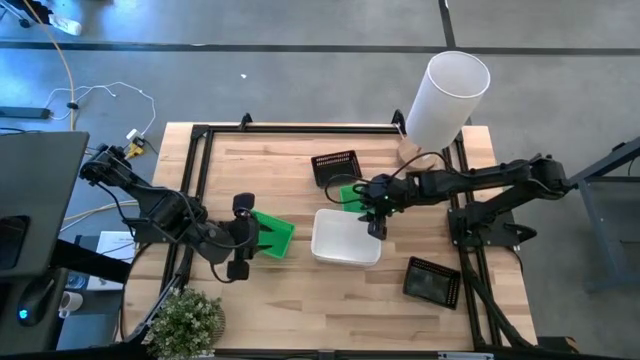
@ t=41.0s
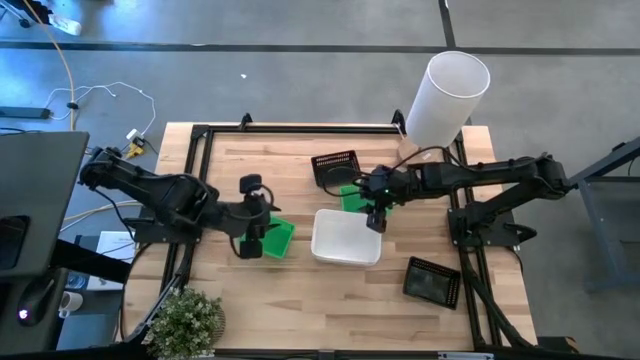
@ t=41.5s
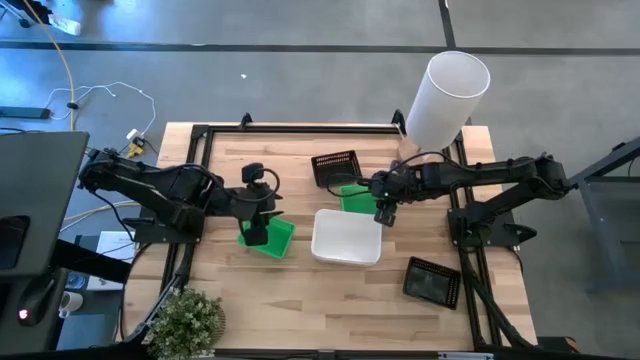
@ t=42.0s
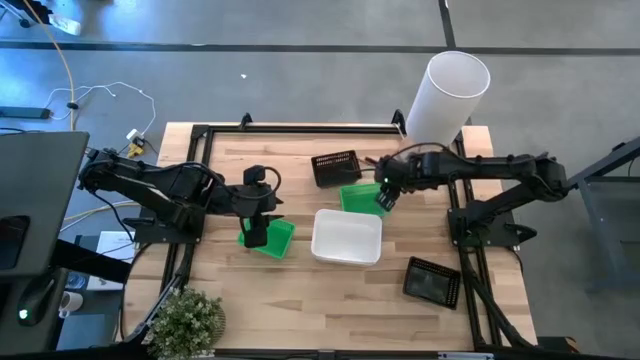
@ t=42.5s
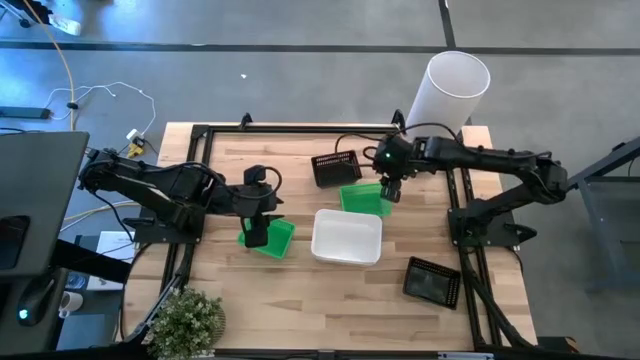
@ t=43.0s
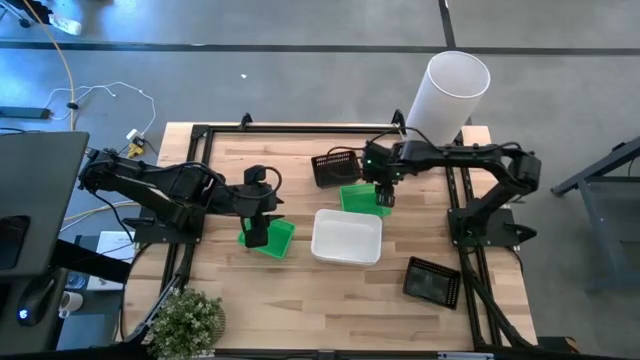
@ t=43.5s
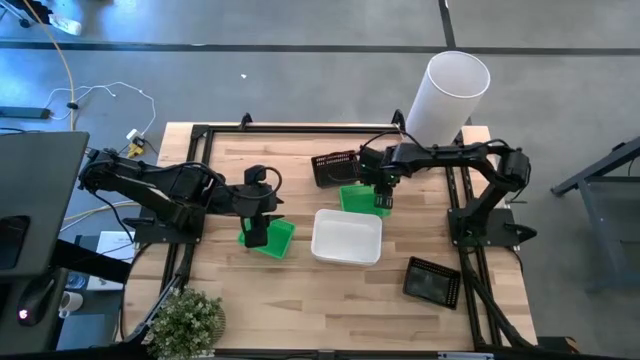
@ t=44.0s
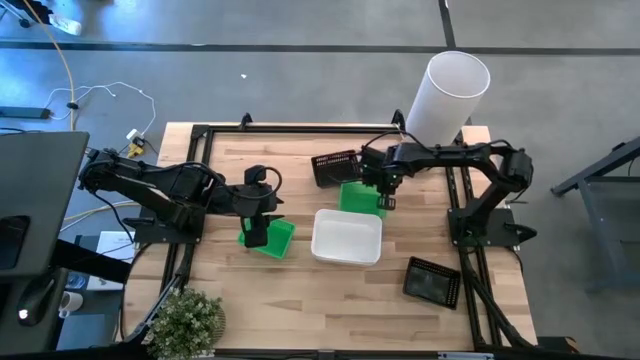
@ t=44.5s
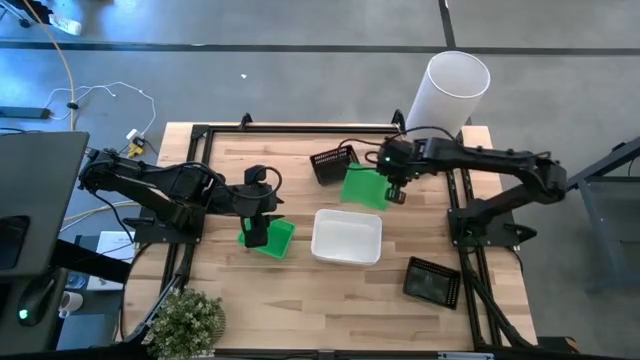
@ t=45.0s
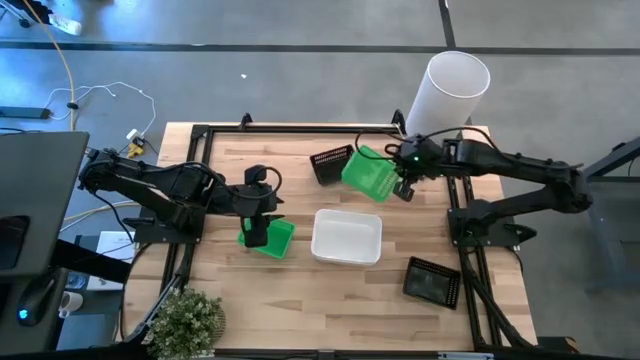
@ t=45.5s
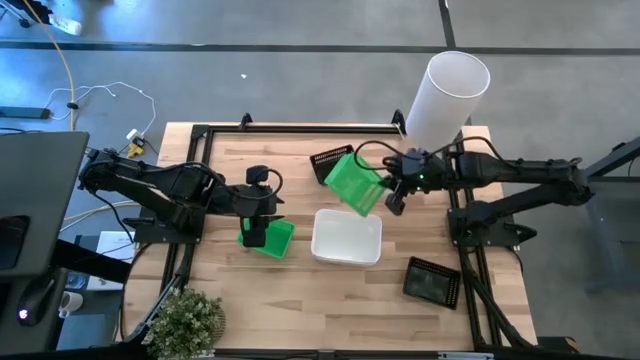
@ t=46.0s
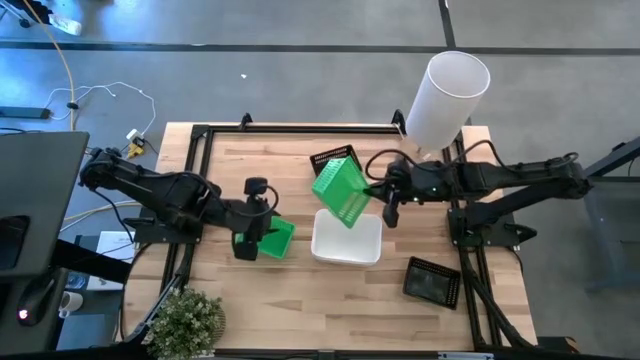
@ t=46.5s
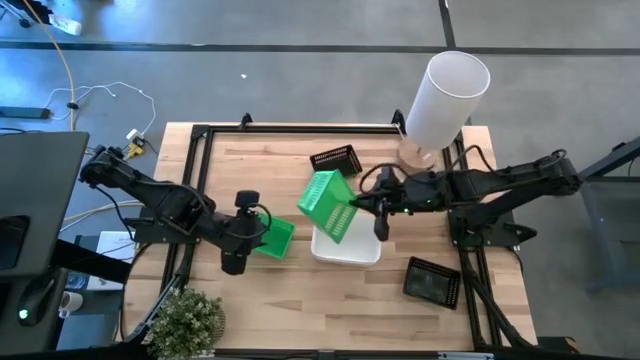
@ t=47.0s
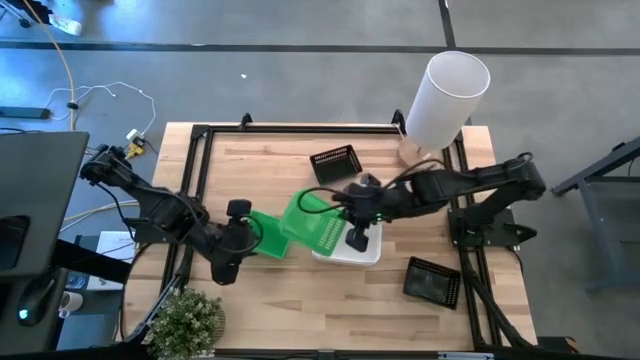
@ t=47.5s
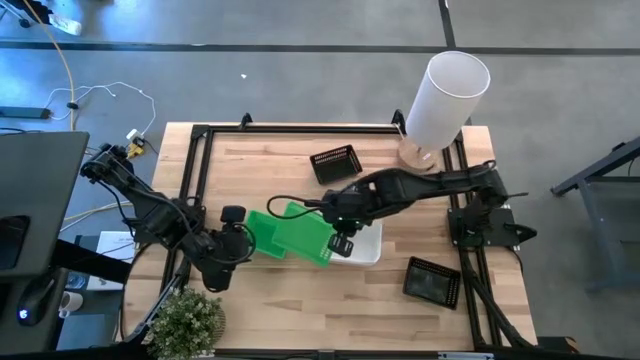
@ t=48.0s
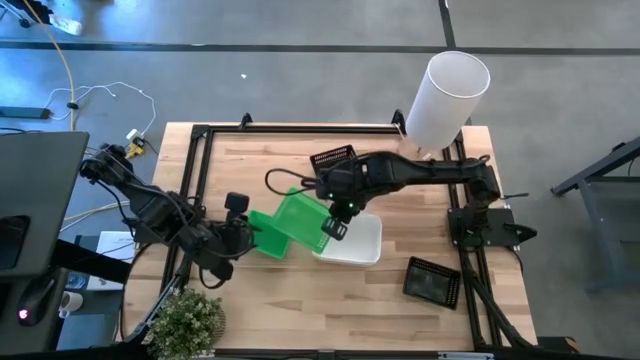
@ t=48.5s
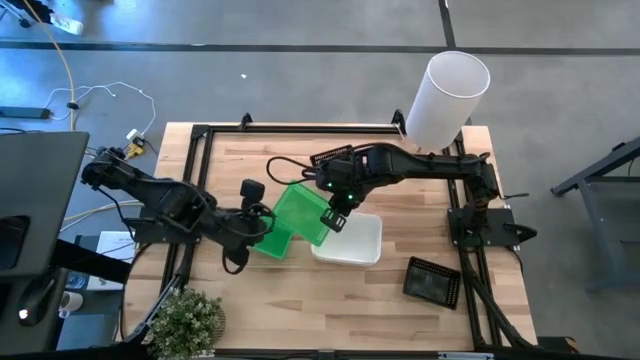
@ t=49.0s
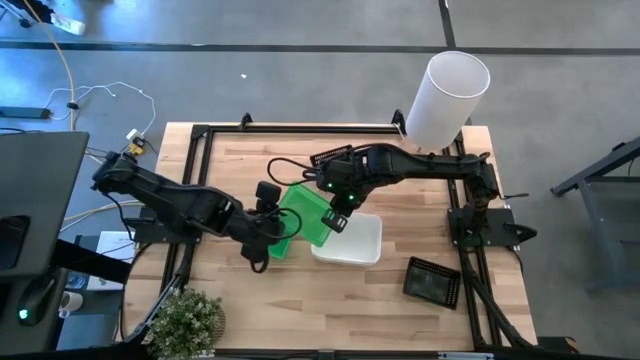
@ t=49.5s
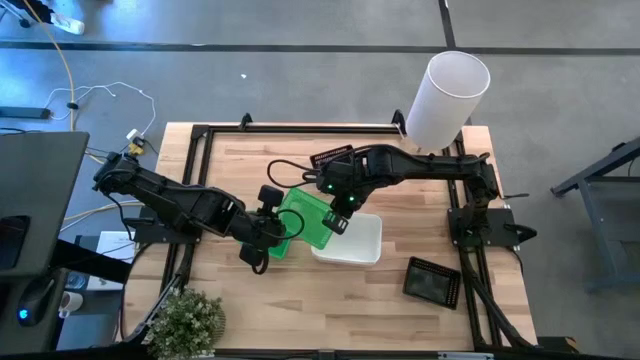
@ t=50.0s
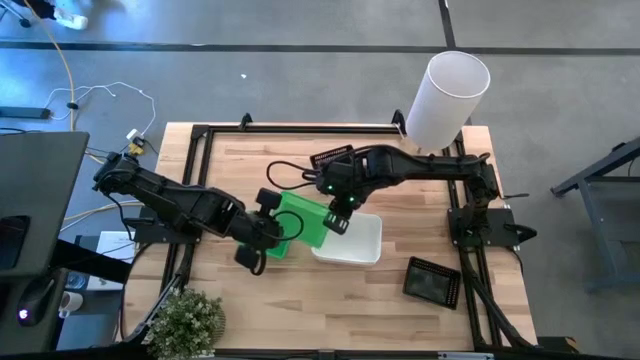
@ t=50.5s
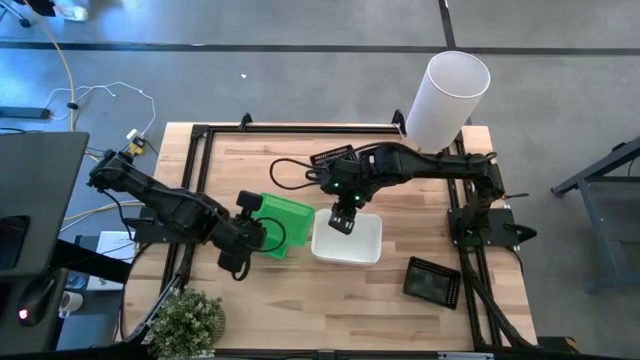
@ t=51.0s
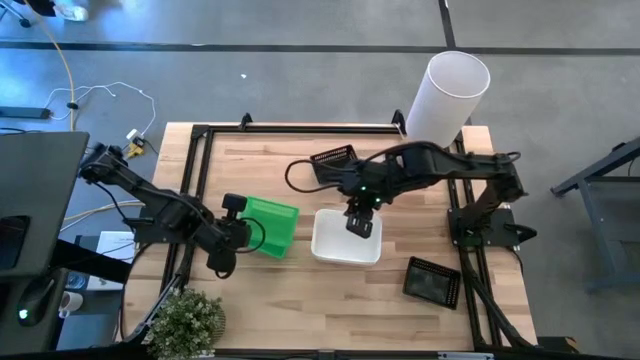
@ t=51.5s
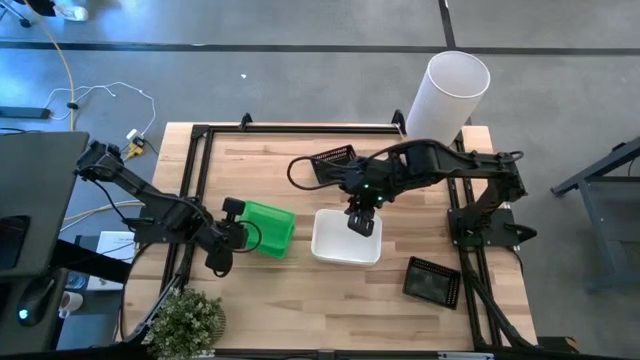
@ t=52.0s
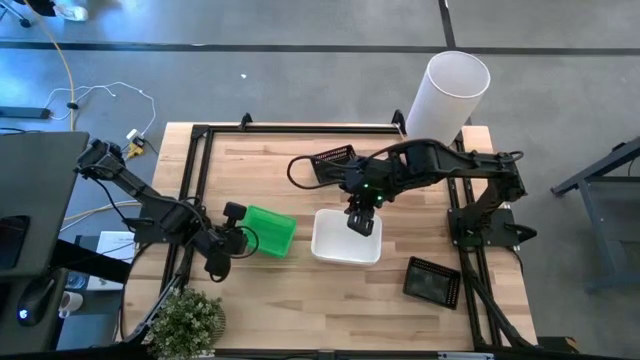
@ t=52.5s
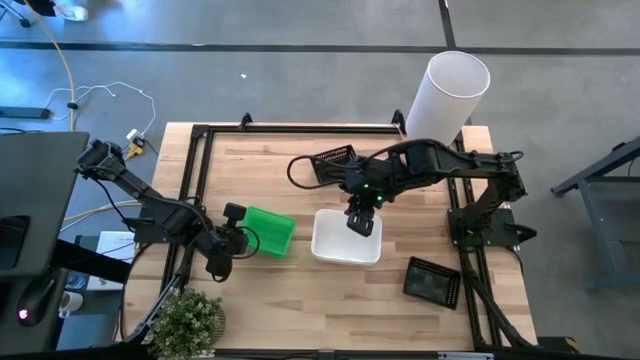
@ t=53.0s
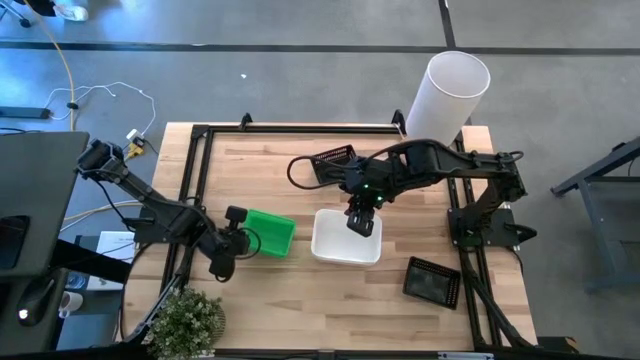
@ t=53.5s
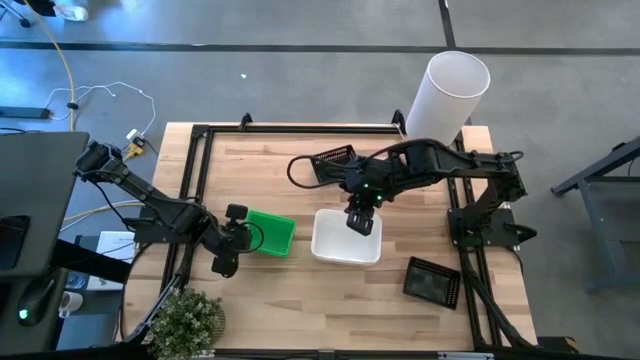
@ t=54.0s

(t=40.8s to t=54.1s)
Stack the right green bin on the green bin

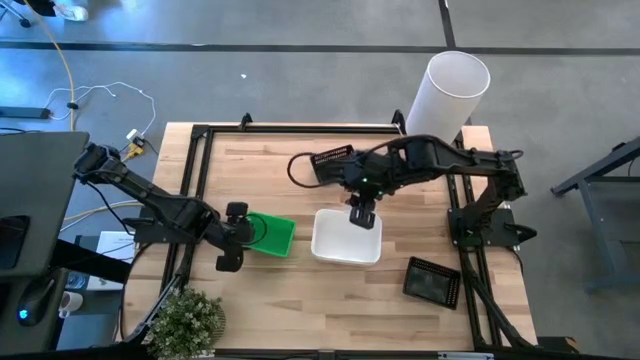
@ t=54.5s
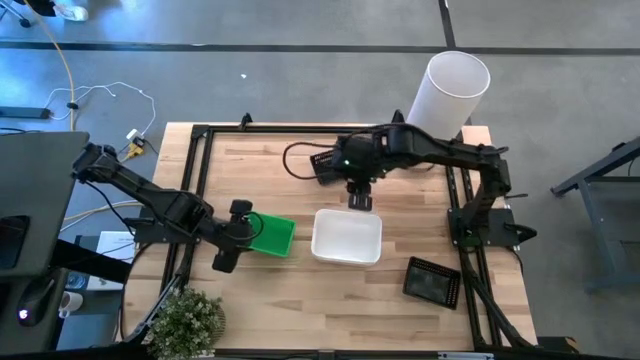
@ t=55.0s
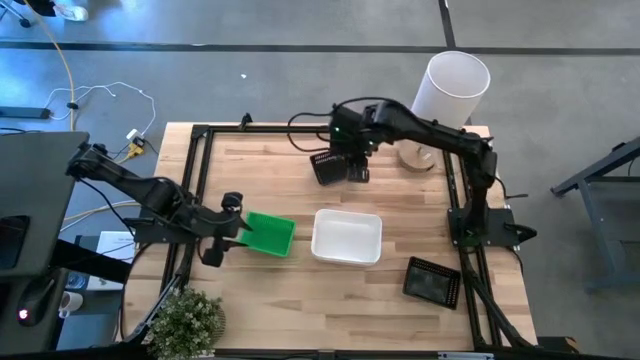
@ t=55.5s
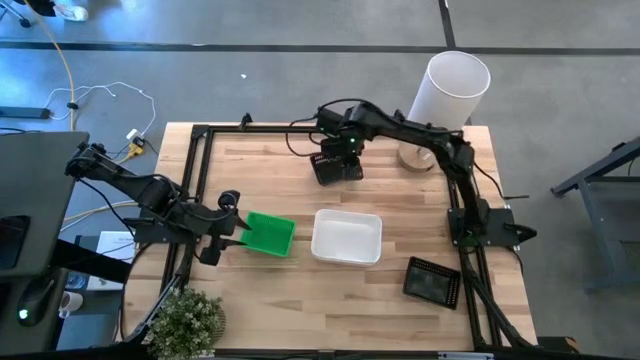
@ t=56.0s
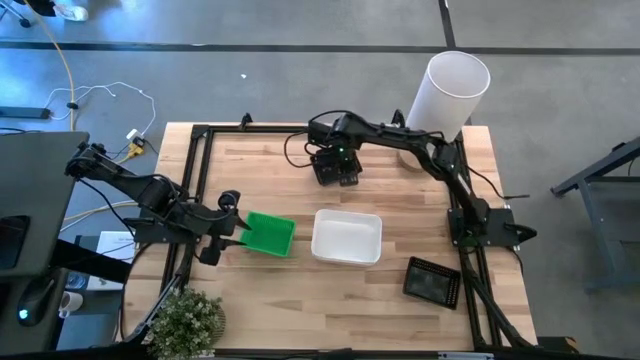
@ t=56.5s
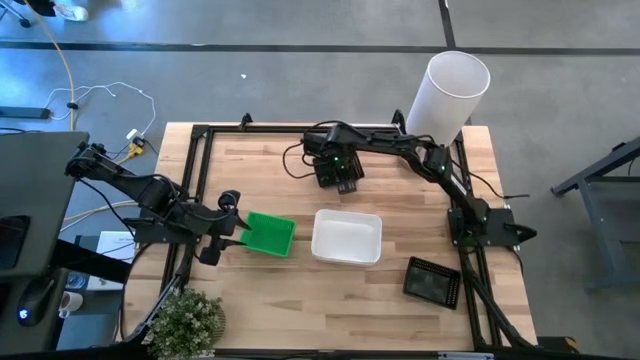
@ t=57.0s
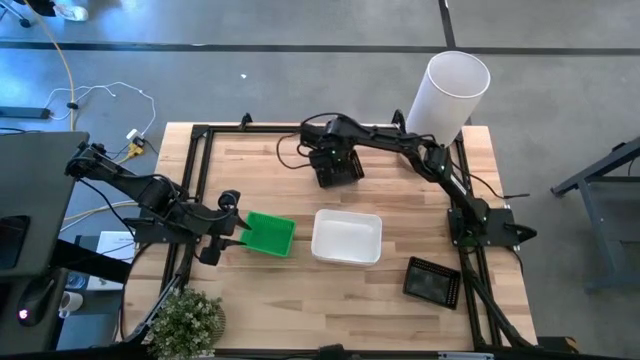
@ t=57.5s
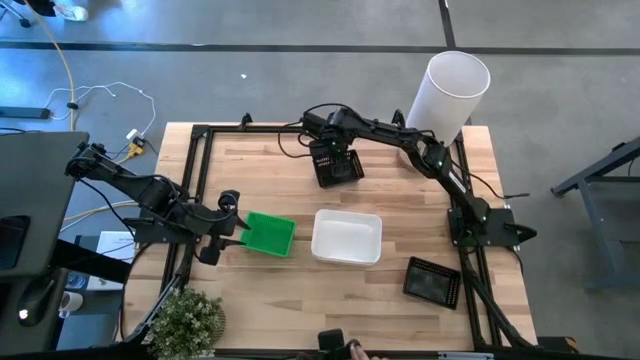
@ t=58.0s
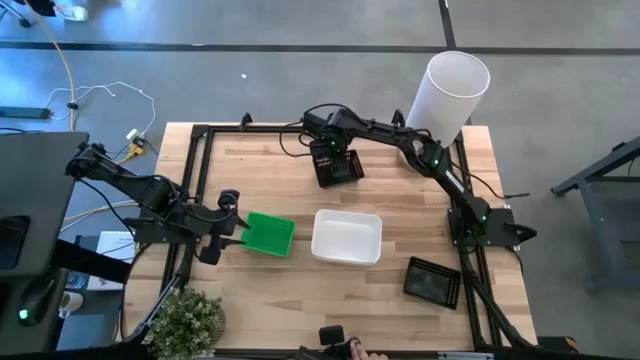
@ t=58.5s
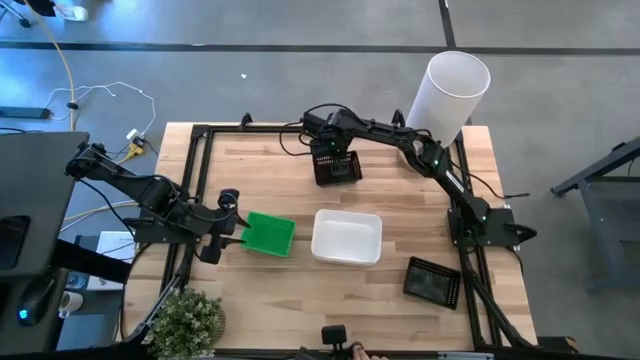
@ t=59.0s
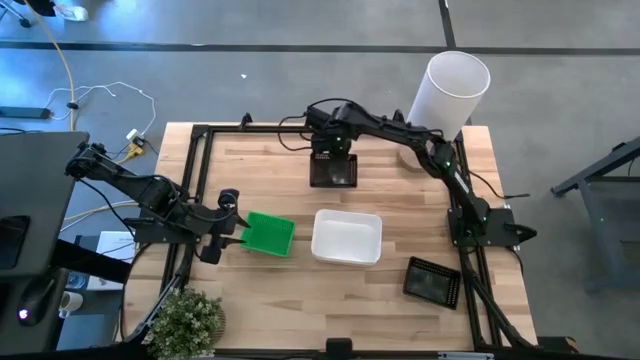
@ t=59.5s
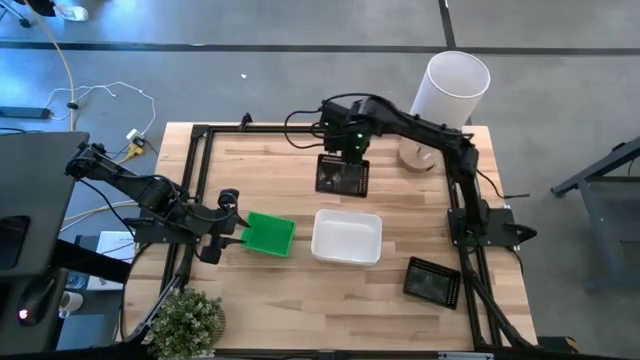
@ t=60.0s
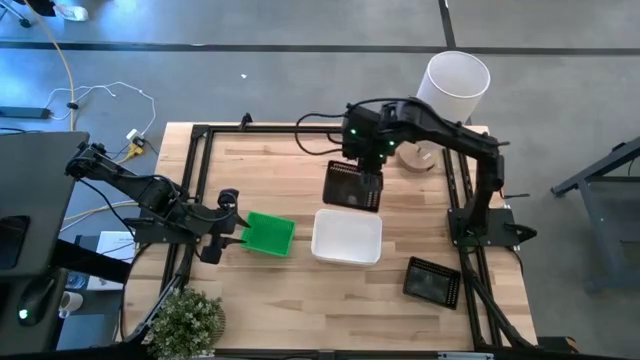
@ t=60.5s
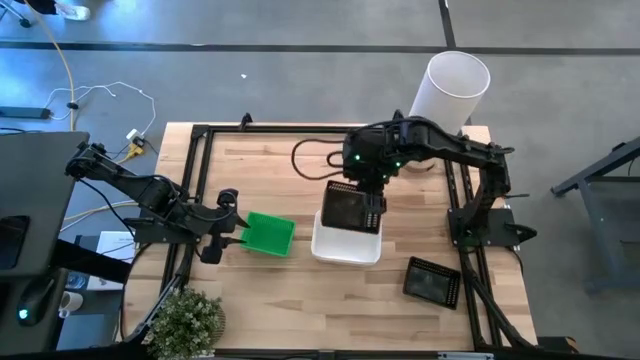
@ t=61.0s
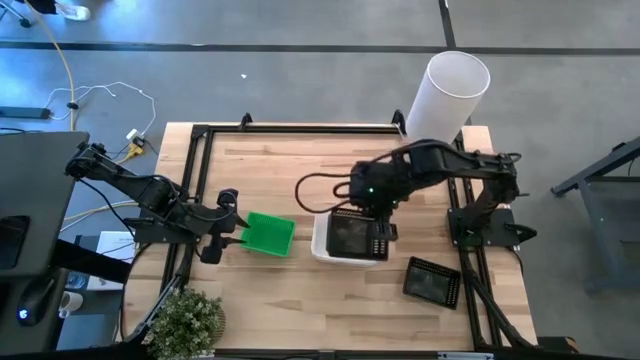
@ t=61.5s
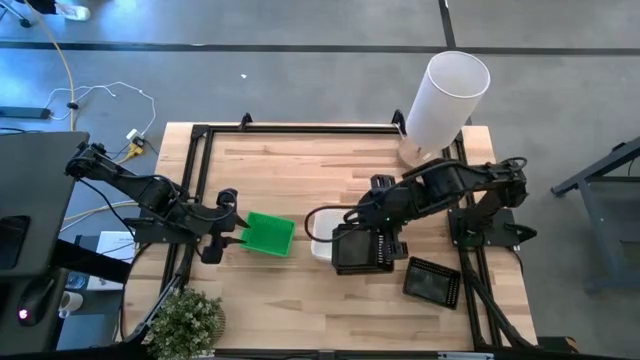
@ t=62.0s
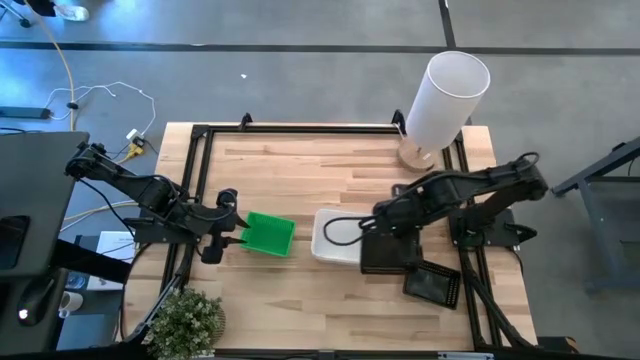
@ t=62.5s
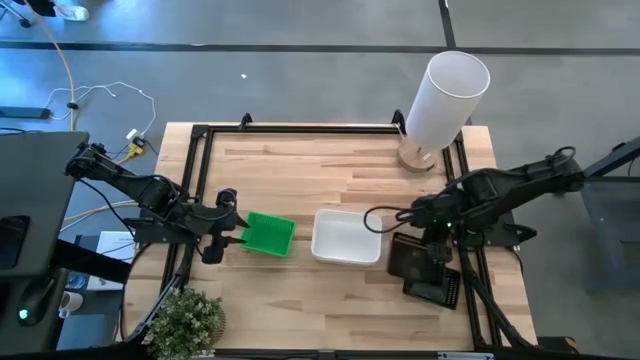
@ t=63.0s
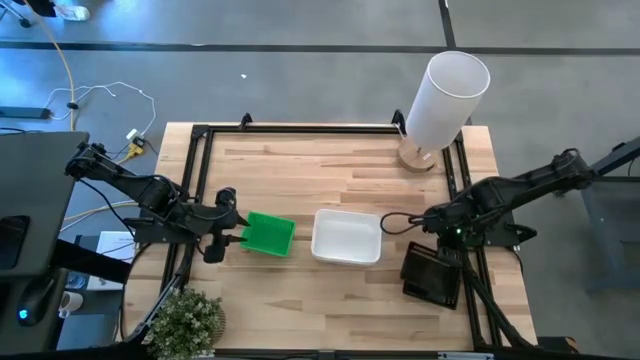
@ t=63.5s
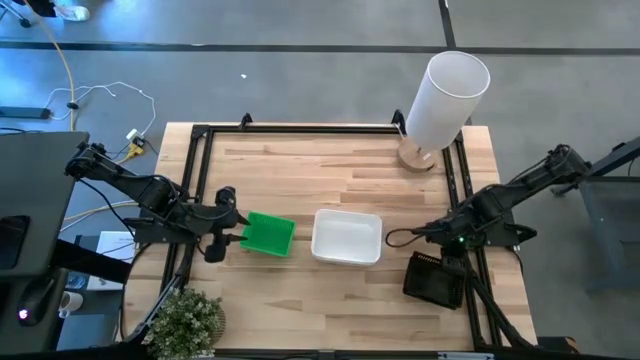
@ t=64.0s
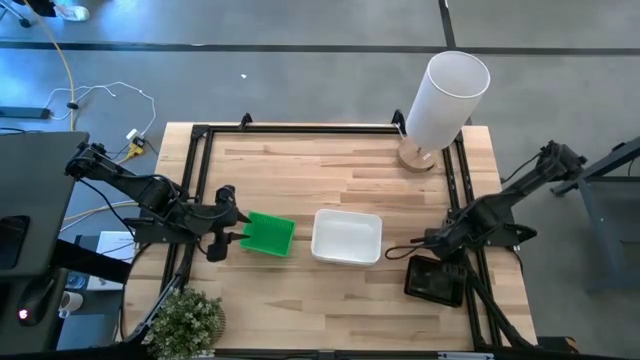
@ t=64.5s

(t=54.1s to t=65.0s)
Stack the top black bin on the black bin
